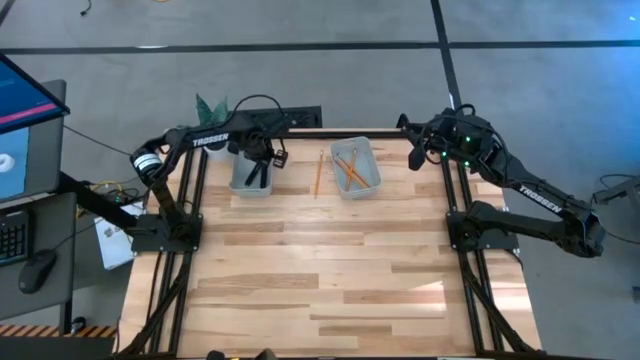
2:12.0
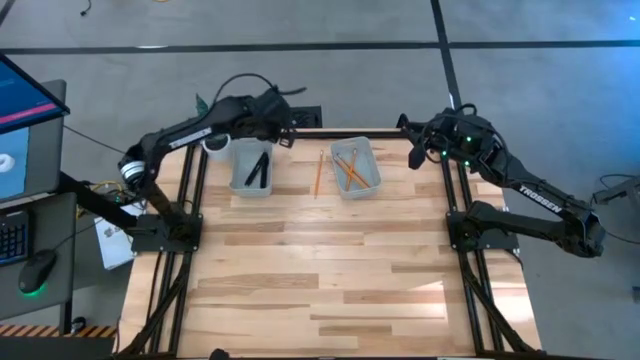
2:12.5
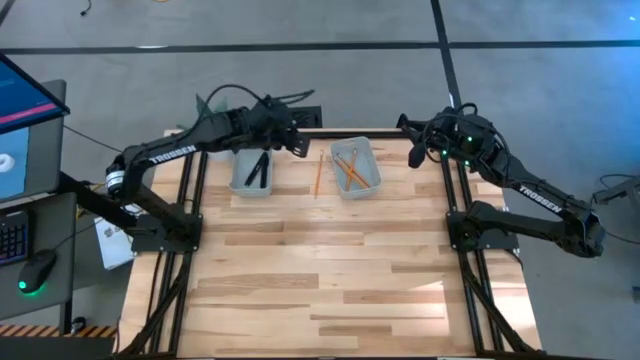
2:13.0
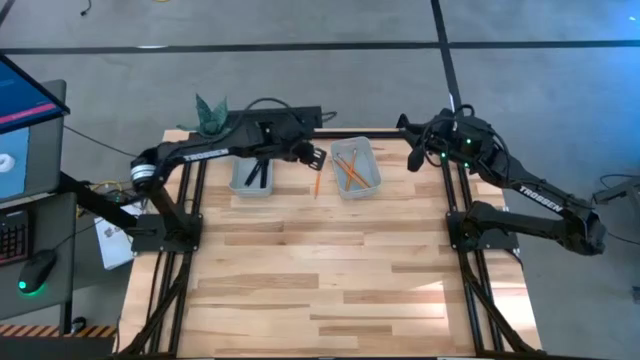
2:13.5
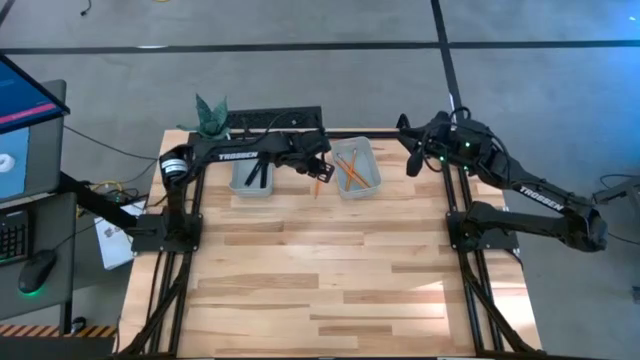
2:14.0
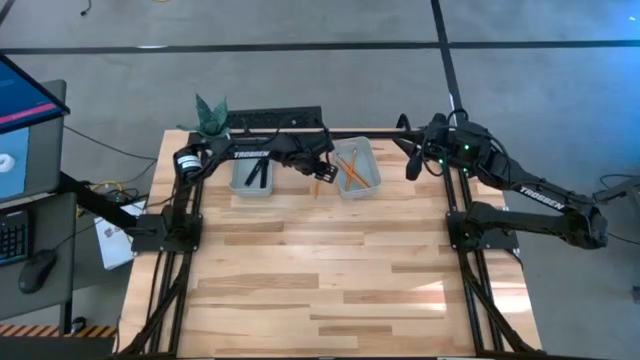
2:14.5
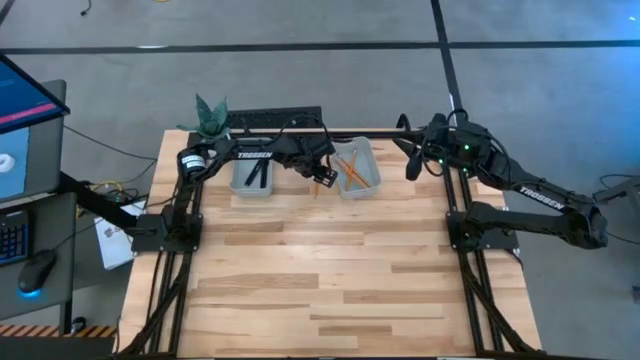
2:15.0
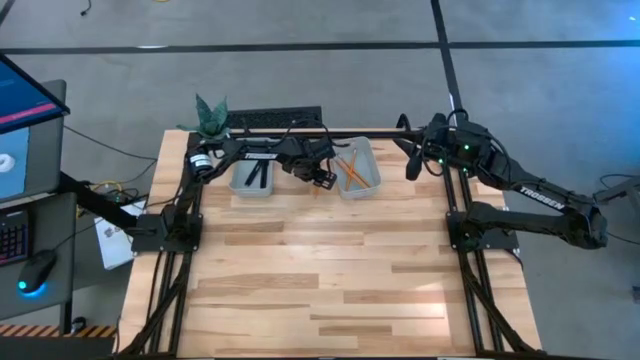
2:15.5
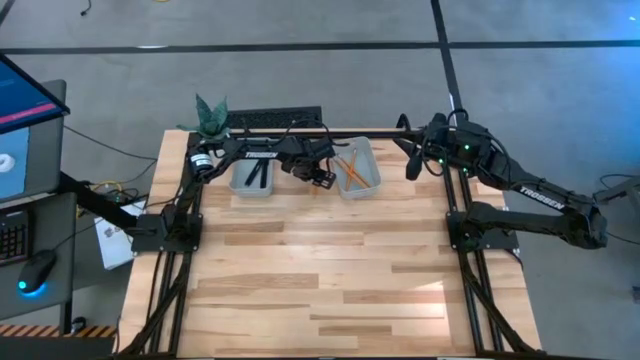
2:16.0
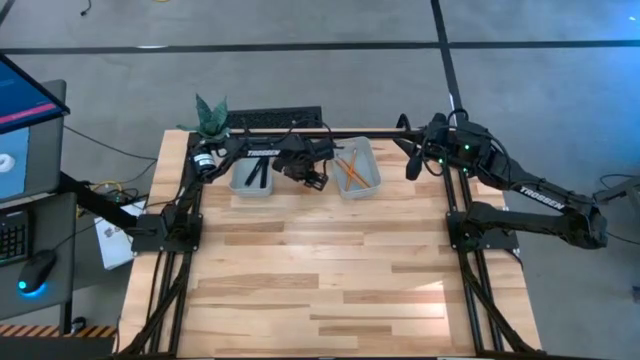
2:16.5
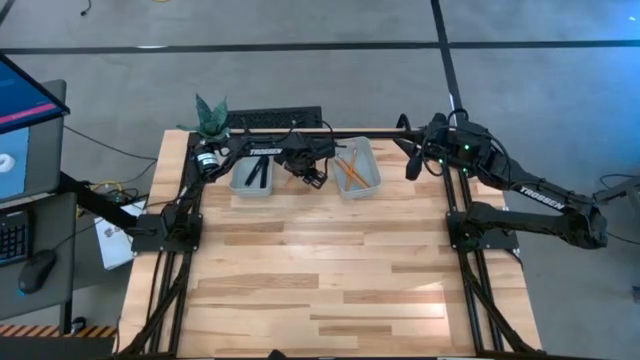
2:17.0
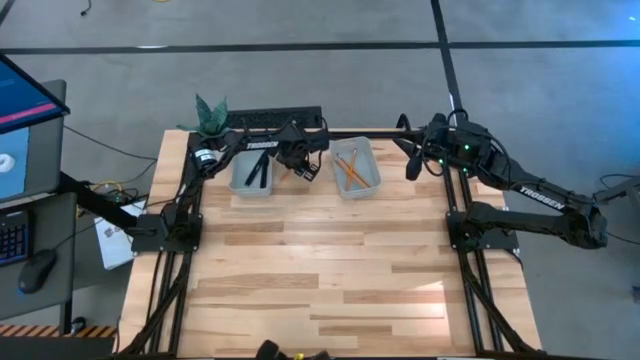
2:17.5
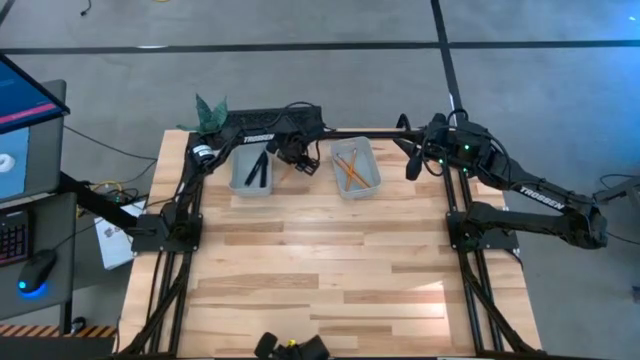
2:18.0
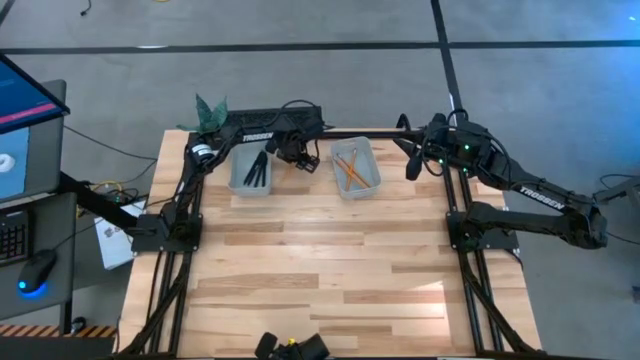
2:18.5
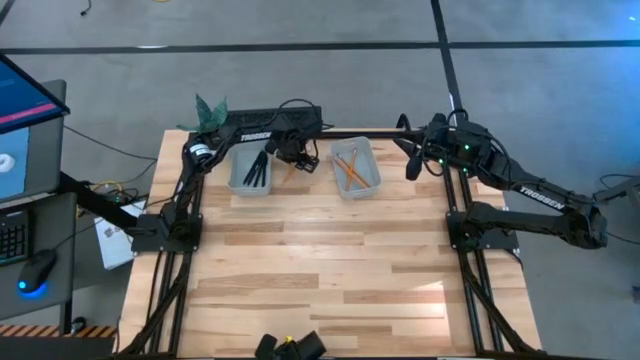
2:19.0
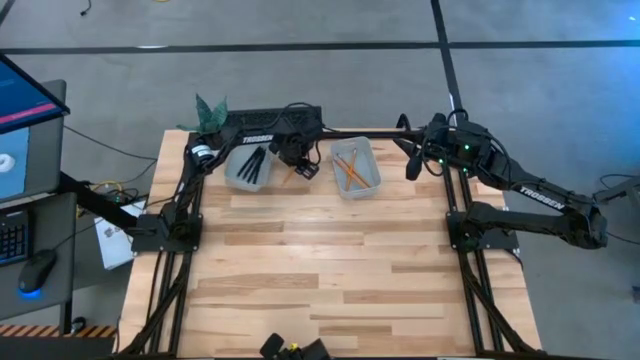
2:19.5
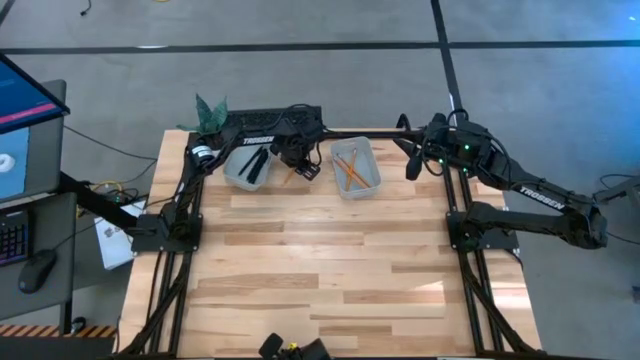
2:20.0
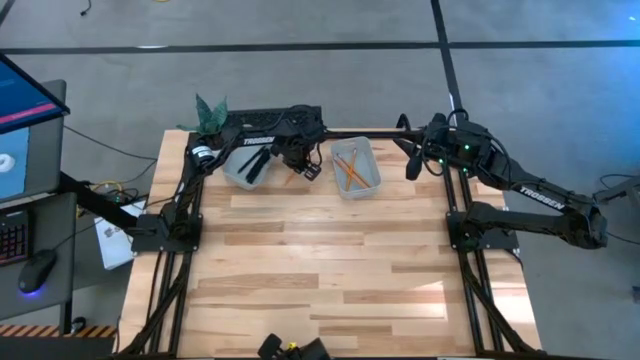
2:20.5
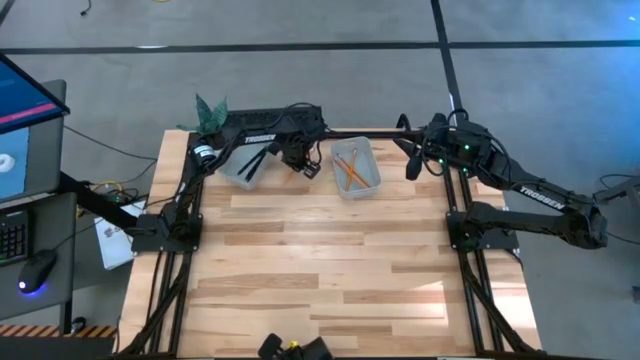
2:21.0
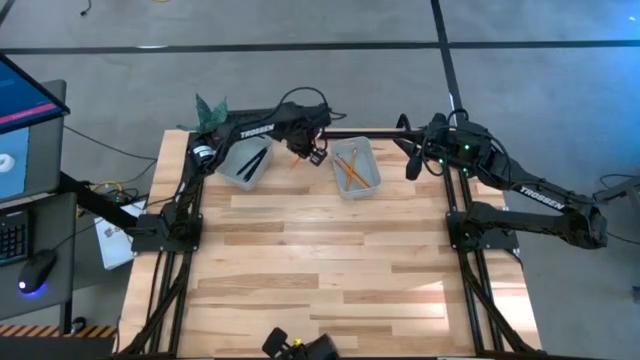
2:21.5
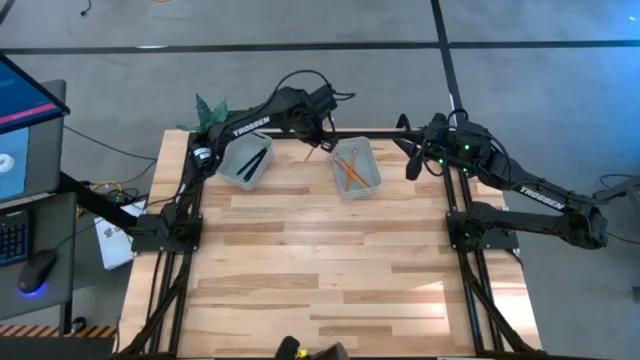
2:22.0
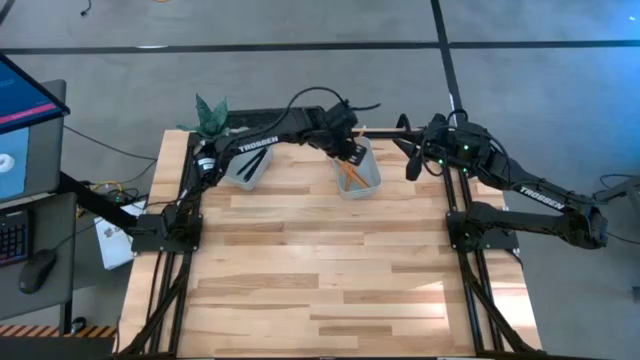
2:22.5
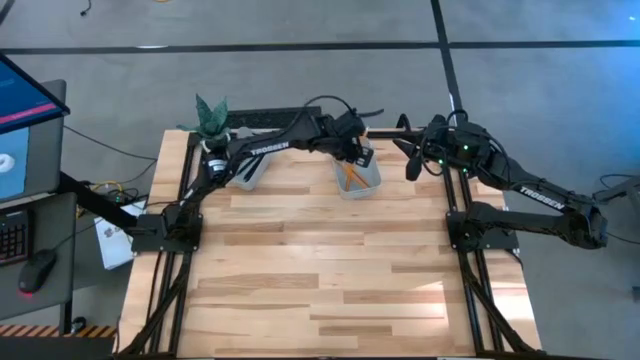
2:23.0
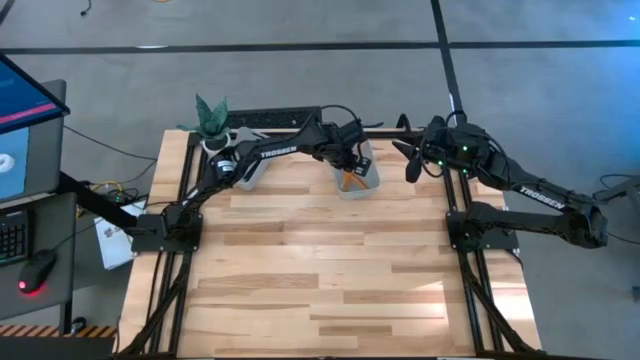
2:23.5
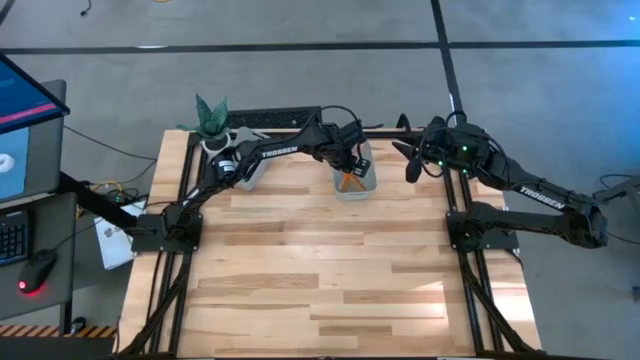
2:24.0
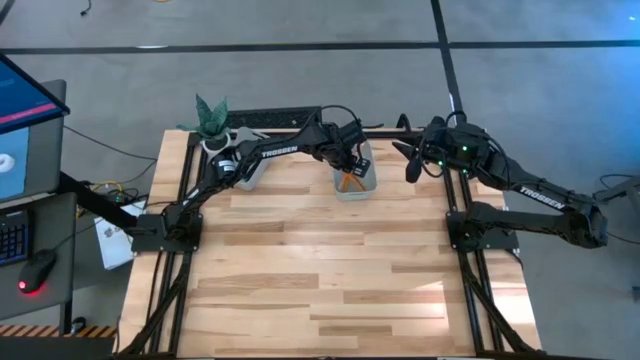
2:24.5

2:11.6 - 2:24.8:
Task: Sort pens & pencils
Put the orange pencil into the right gray bin

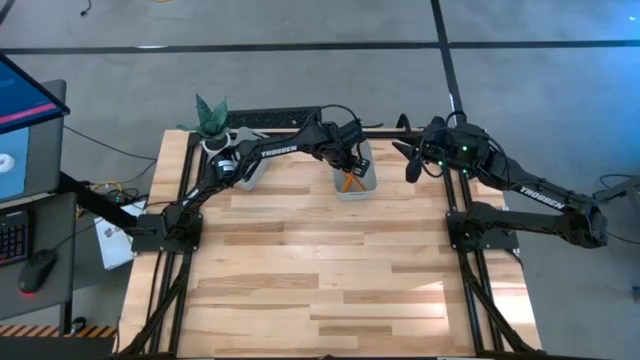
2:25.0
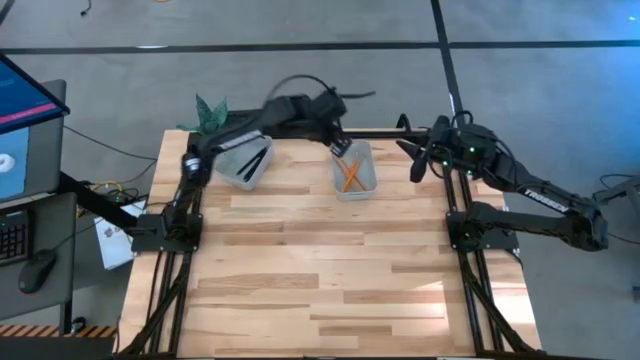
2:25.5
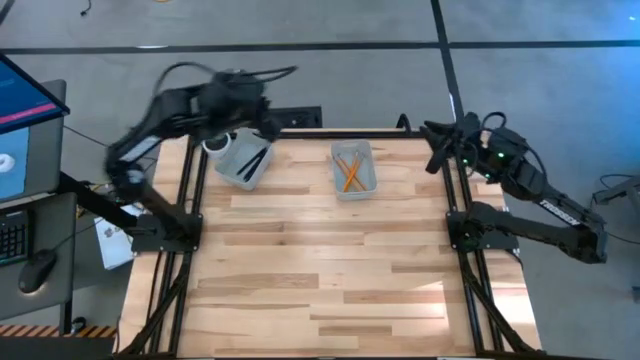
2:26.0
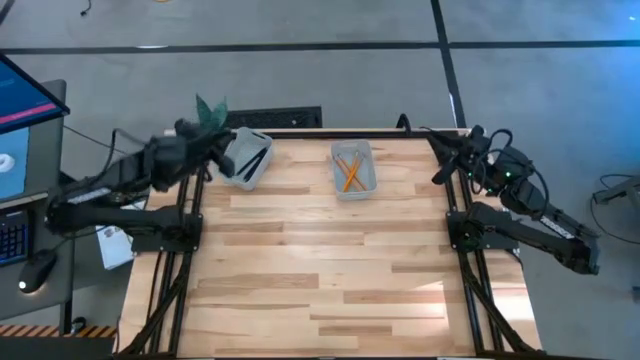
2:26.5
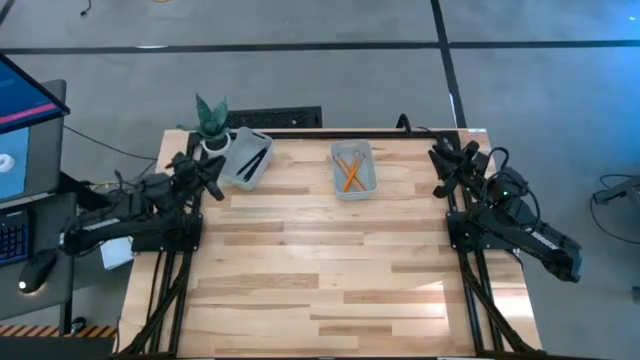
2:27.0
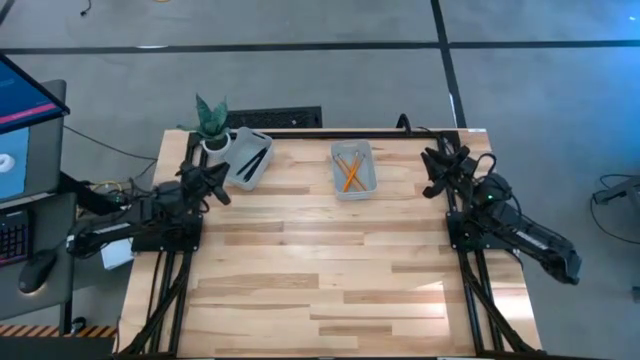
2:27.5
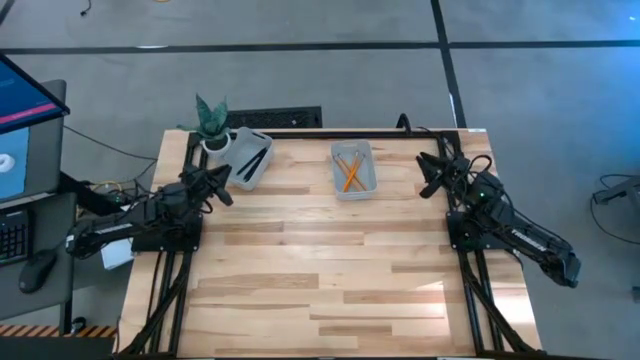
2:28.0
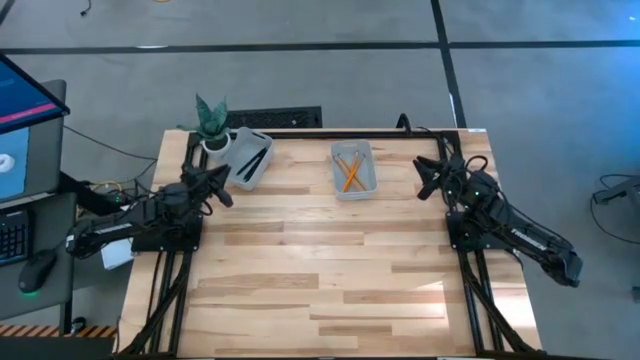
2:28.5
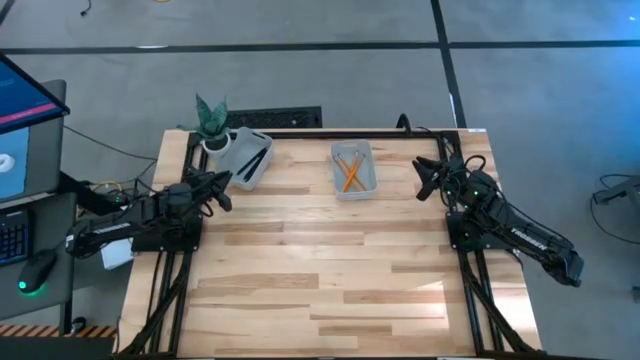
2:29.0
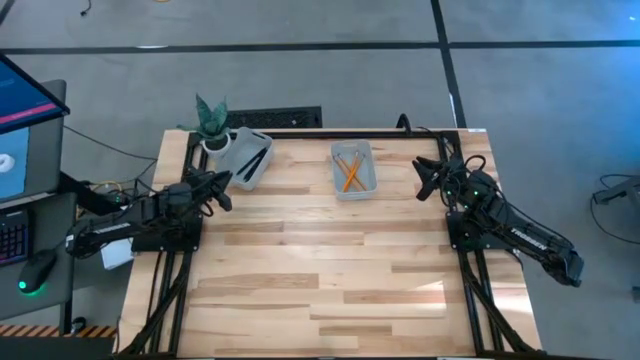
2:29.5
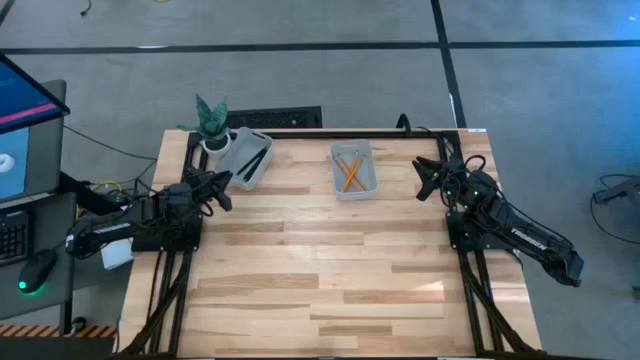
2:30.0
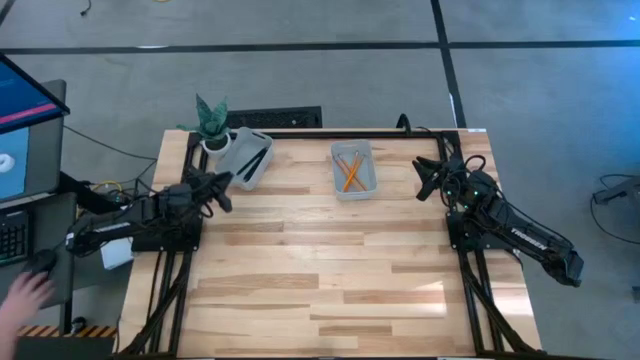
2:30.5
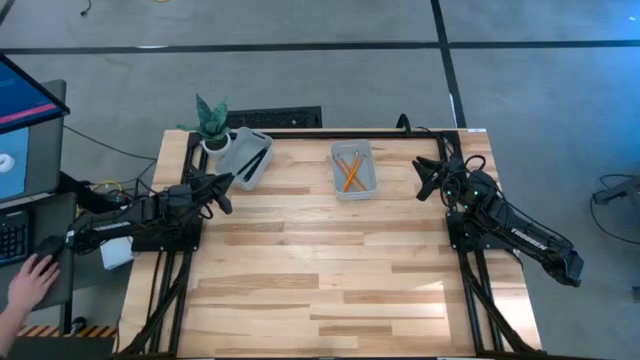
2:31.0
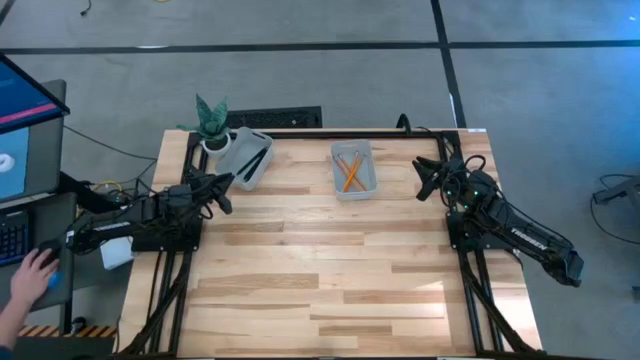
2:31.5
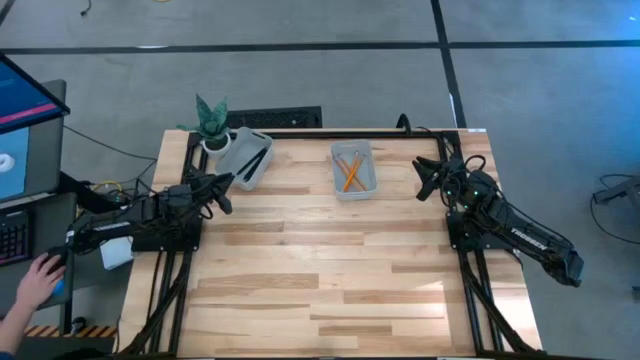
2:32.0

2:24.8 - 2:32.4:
Return to Home Position
